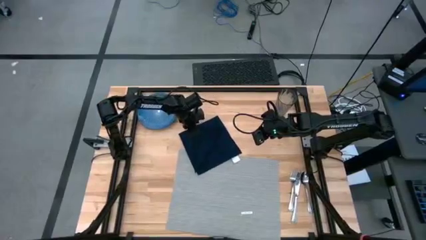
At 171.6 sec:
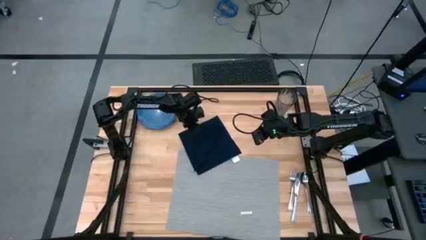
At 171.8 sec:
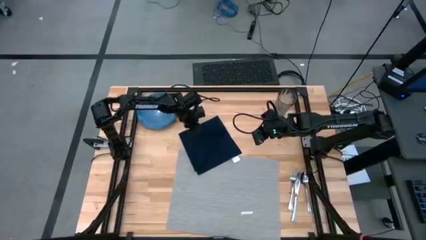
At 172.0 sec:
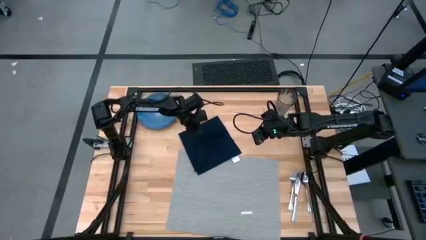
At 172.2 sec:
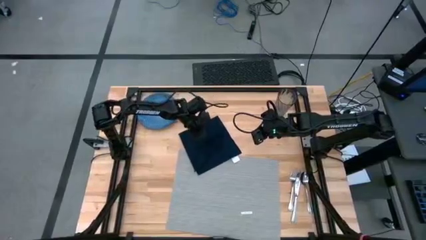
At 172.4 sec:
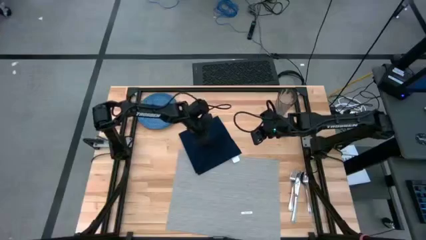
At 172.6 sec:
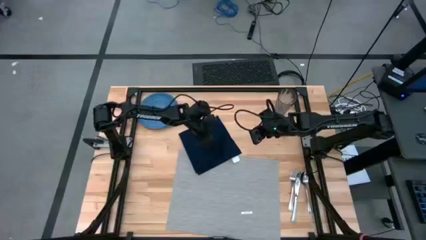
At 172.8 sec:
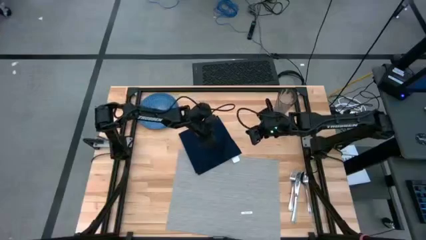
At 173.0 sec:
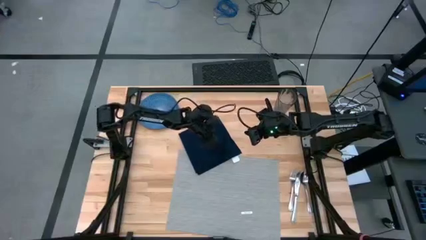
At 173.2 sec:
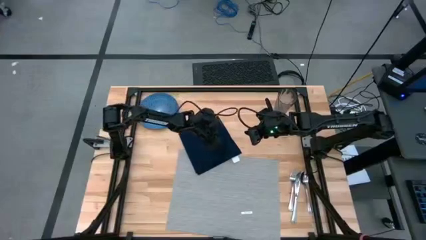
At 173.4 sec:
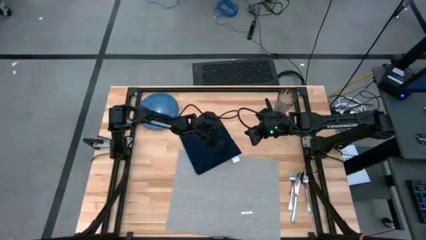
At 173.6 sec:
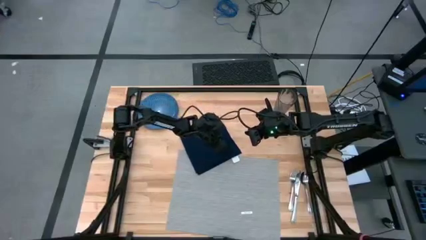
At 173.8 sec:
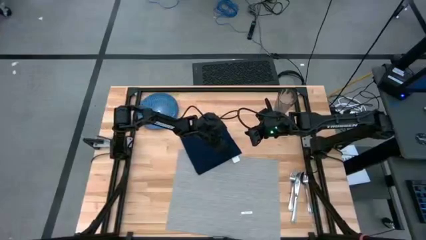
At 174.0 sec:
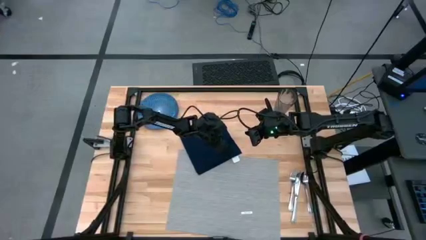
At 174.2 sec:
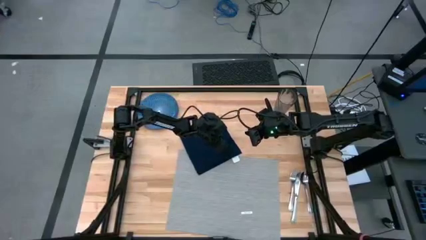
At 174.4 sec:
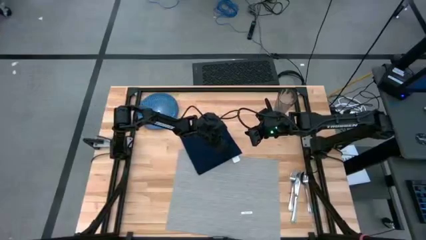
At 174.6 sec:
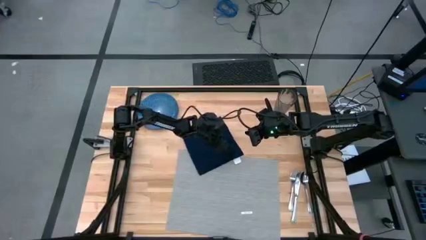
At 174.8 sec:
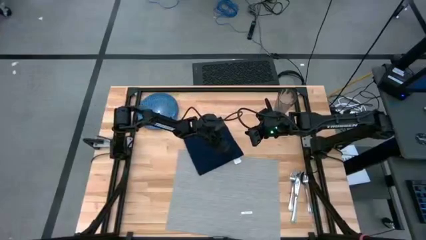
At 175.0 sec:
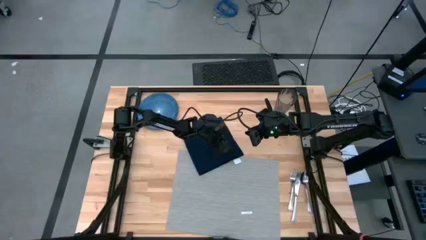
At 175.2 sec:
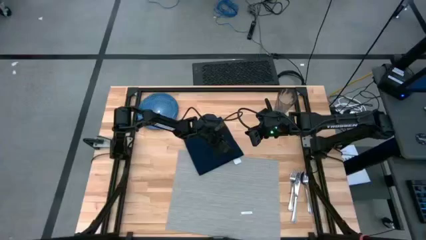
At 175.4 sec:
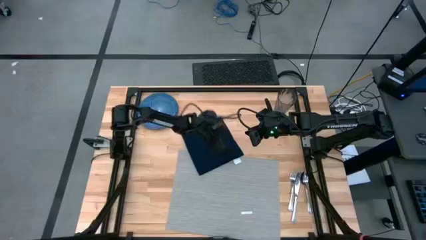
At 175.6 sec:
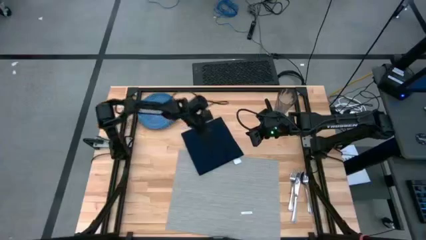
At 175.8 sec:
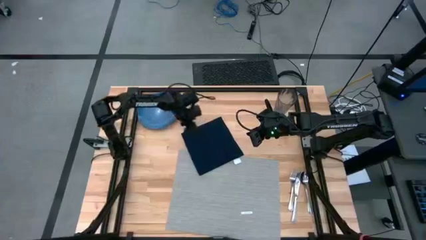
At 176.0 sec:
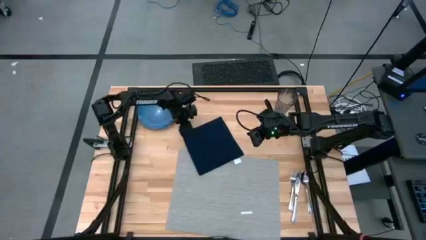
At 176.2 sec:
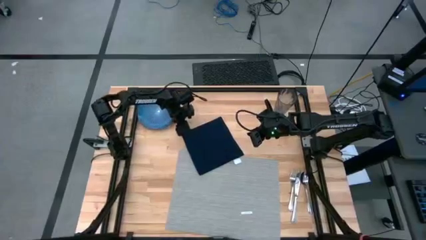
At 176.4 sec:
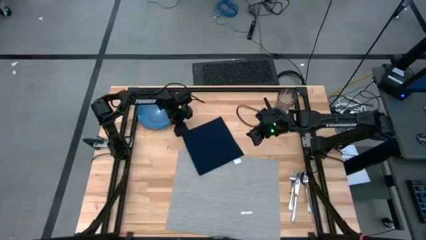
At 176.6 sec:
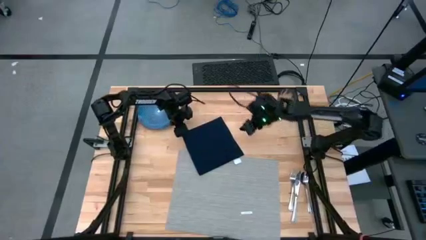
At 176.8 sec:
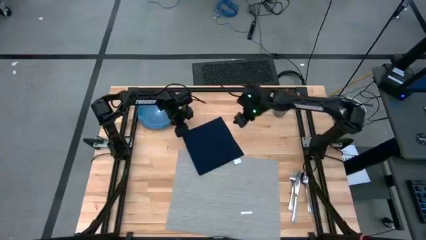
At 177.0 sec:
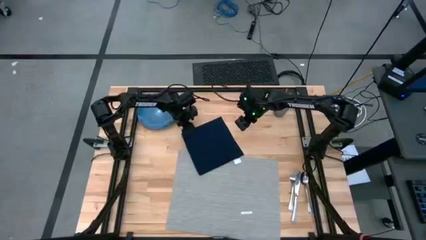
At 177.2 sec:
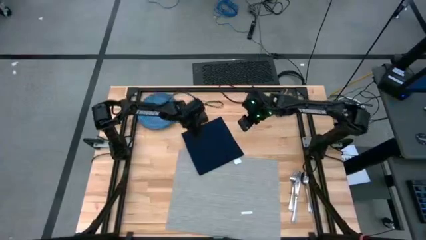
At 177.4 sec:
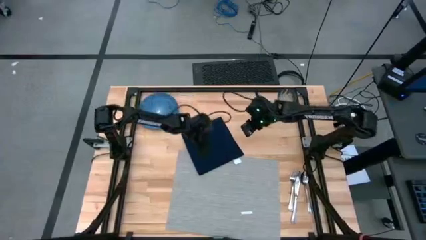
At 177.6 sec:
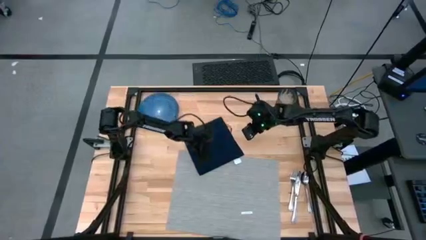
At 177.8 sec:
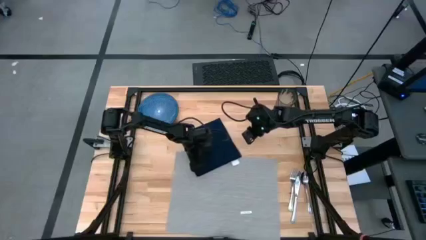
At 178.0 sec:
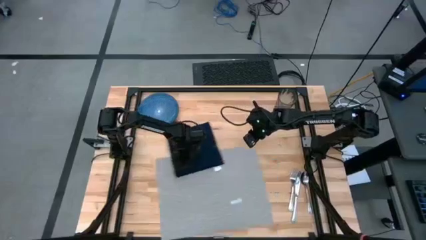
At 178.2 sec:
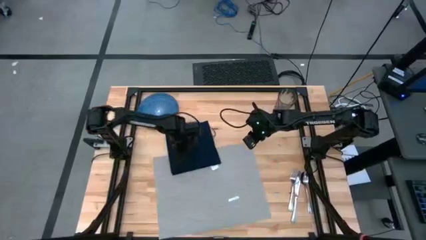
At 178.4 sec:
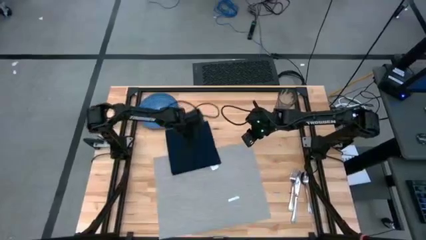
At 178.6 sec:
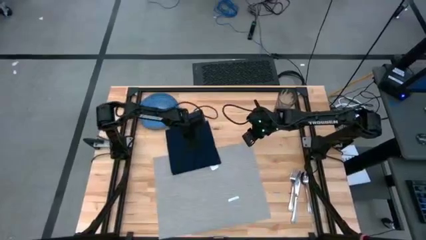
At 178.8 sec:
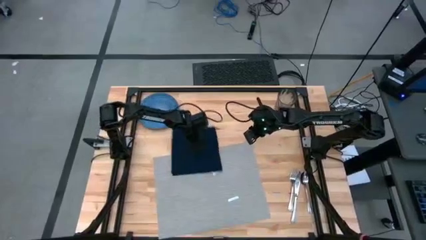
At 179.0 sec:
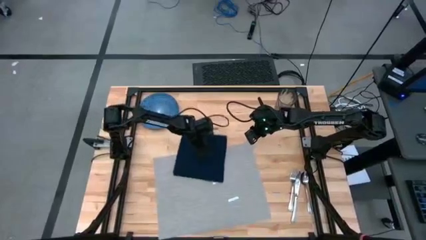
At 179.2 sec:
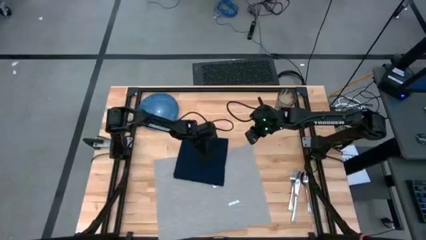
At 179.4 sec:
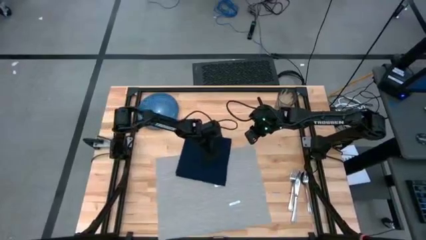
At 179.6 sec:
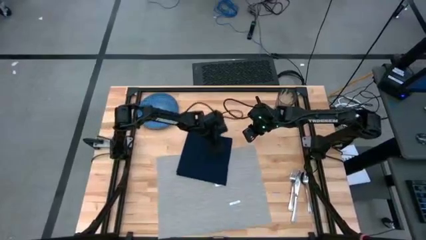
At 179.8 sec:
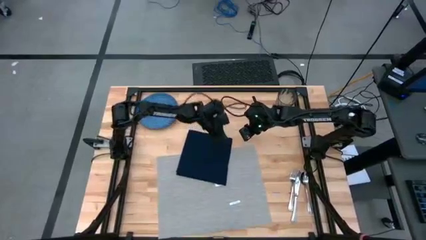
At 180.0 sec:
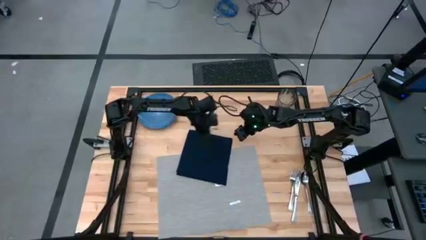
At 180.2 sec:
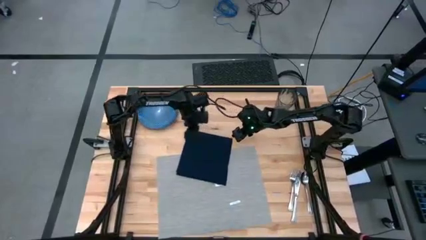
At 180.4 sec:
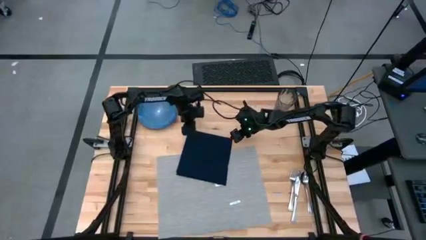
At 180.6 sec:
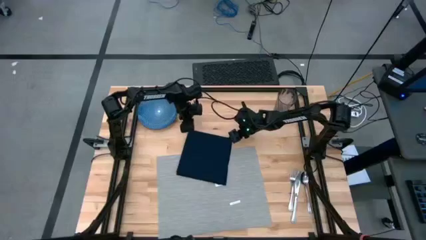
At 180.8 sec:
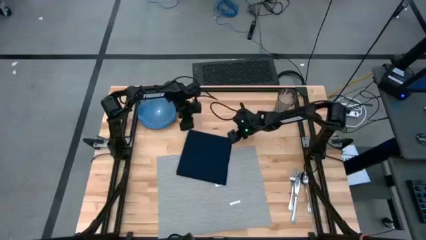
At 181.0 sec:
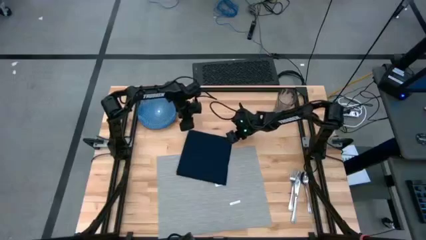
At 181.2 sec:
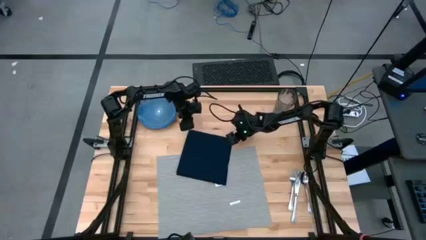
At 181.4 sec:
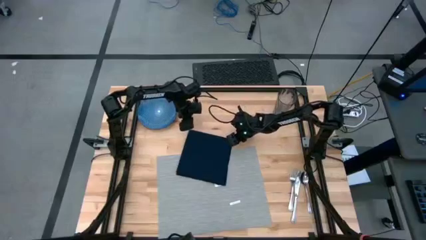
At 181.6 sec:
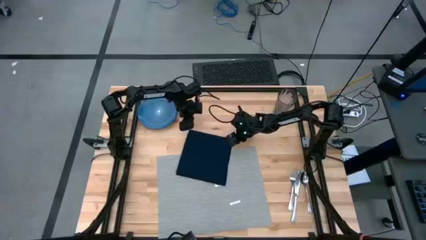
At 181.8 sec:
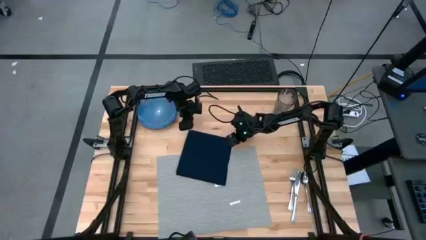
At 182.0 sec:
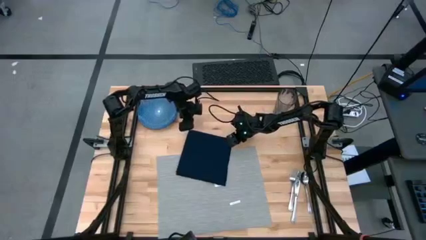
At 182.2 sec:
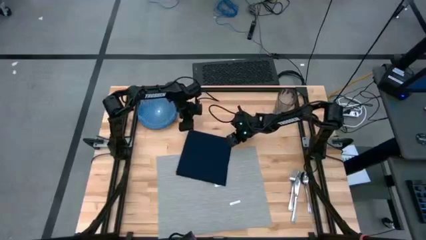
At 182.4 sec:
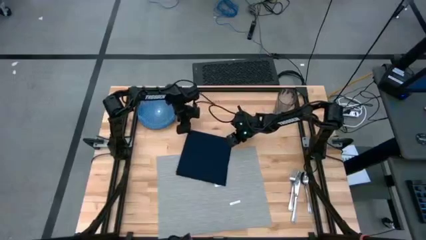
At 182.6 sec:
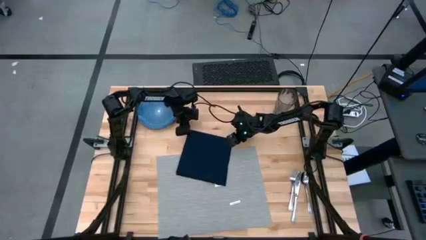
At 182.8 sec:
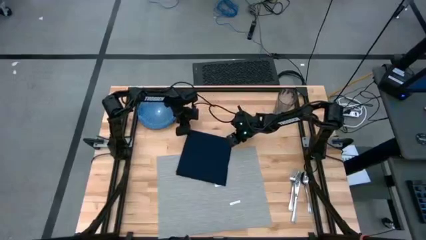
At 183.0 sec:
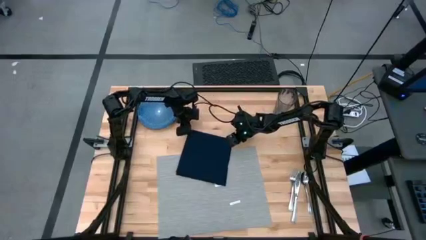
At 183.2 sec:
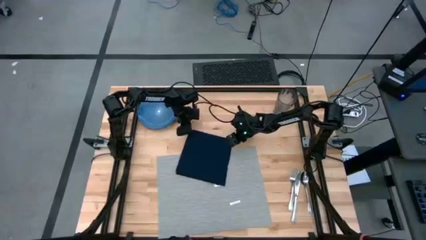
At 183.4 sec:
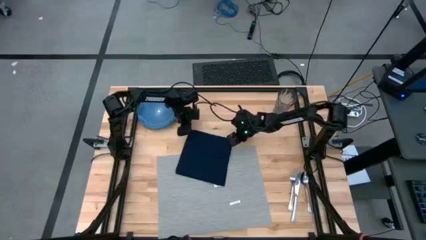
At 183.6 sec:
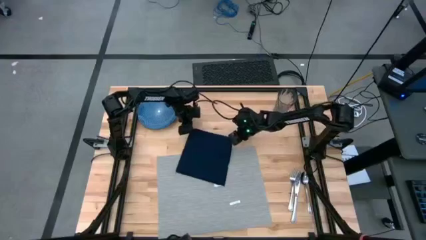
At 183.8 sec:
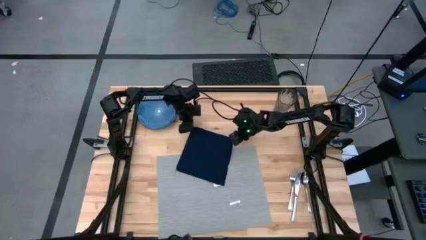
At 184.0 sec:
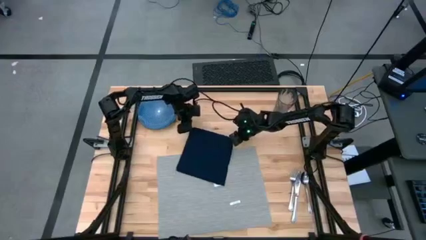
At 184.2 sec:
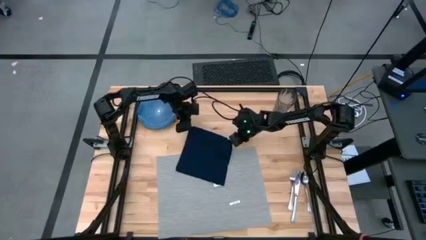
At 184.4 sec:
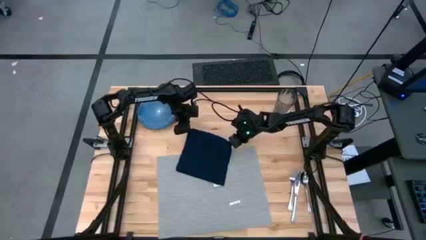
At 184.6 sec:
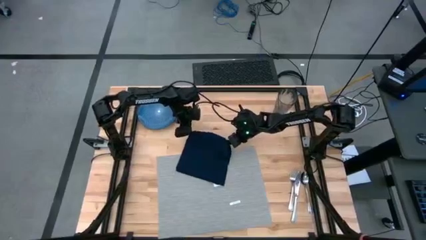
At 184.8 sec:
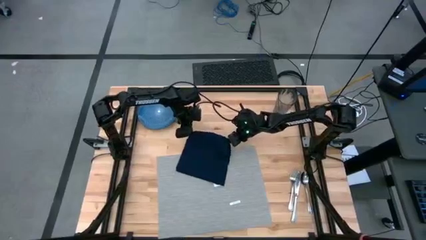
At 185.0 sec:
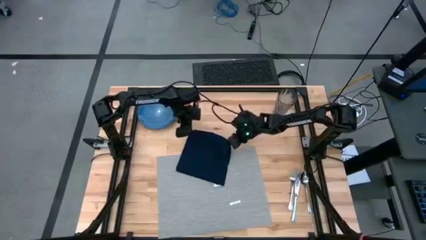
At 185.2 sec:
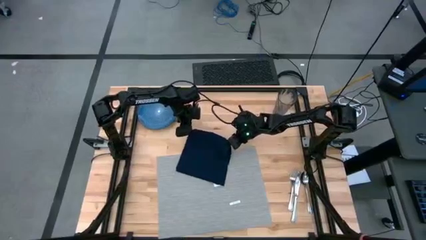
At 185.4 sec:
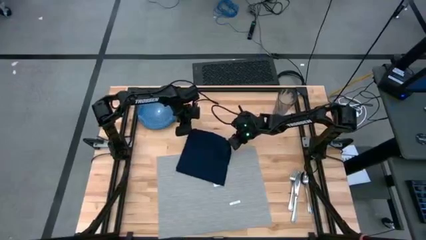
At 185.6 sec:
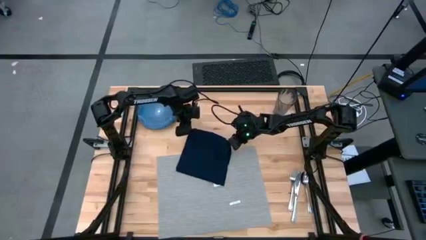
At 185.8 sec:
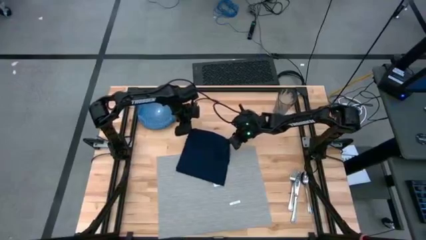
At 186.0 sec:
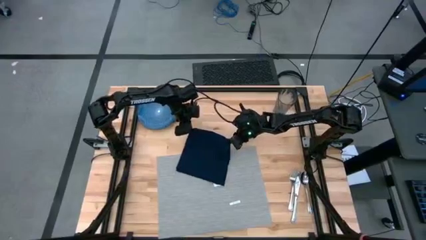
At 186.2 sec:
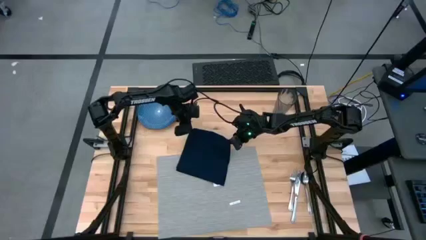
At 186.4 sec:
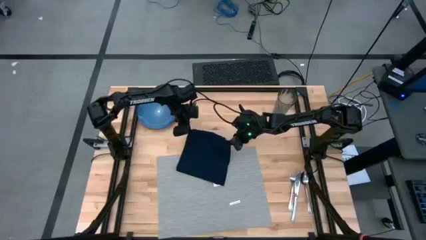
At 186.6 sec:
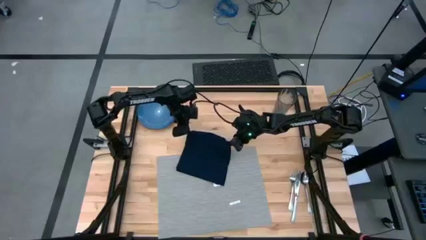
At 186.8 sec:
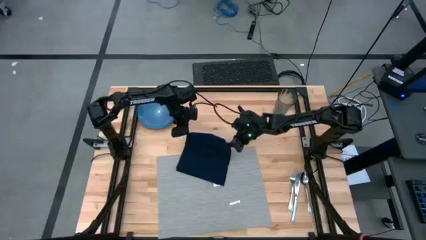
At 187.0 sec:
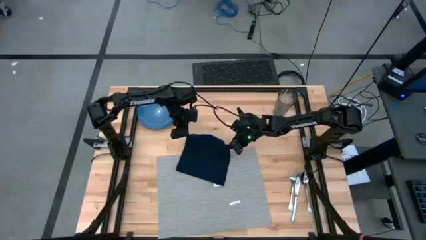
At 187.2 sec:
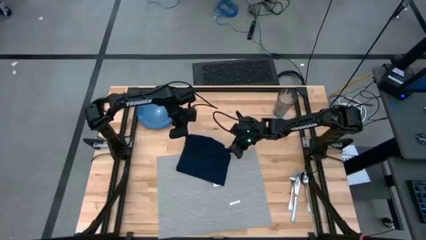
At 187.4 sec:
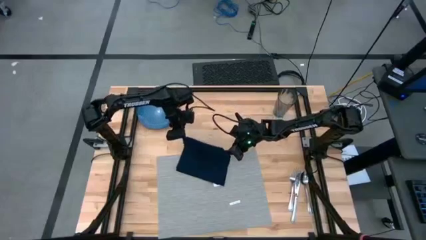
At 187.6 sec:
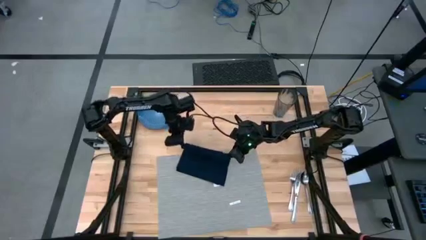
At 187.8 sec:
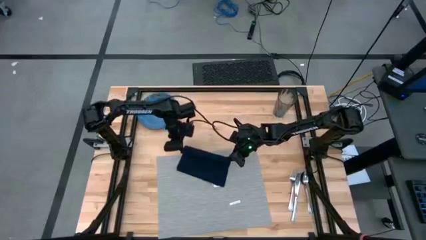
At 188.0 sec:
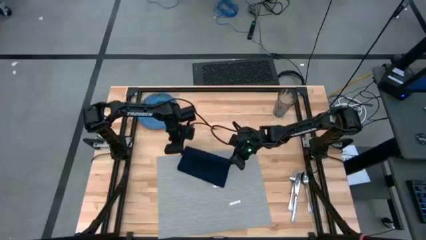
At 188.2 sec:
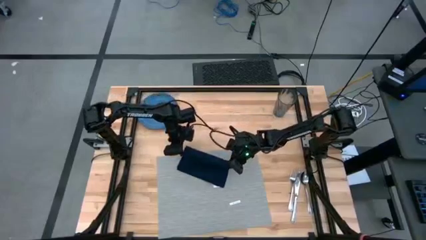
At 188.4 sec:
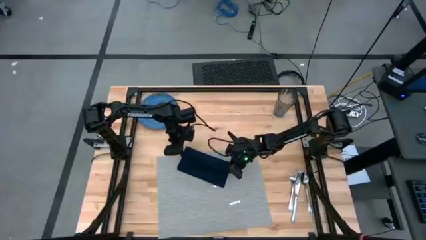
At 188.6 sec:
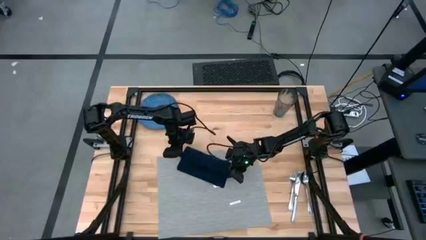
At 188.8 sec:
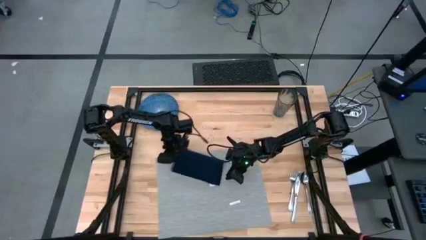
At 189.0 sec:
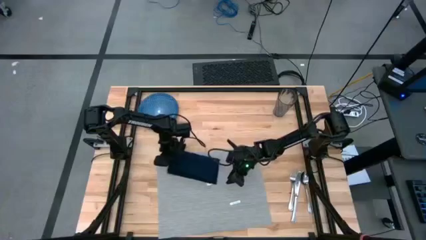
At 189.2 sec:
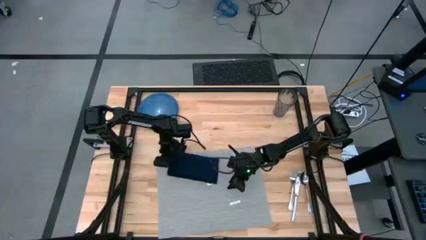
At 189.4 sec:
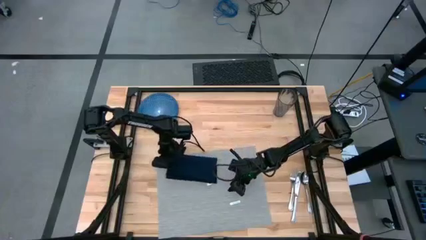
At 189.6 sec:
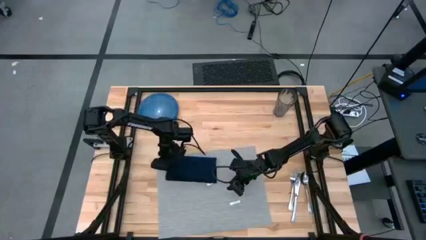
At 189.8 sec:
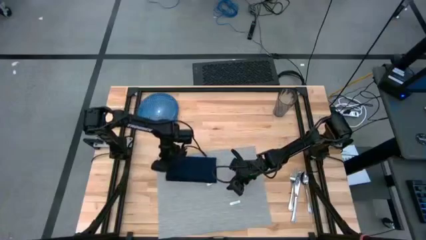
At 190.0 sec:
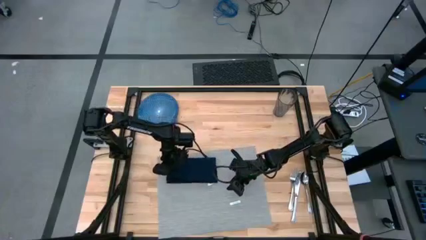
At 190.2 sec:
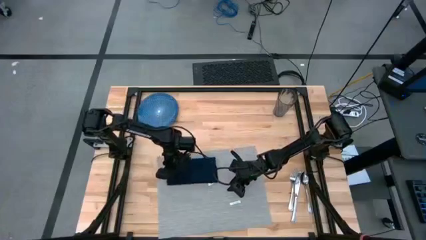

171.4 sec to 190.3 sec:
Task: Set table place
Fold the dark blue napkin
